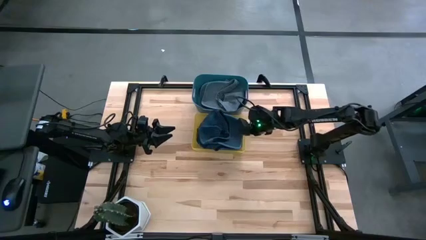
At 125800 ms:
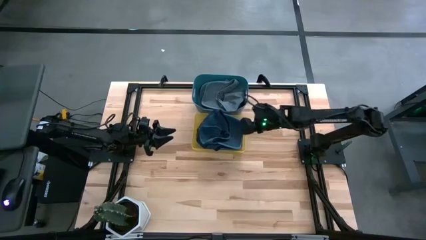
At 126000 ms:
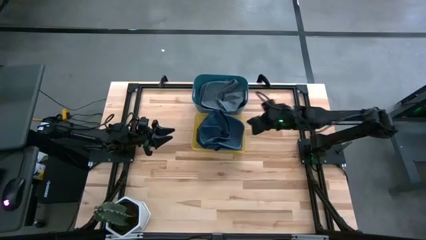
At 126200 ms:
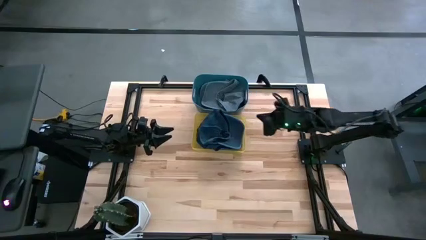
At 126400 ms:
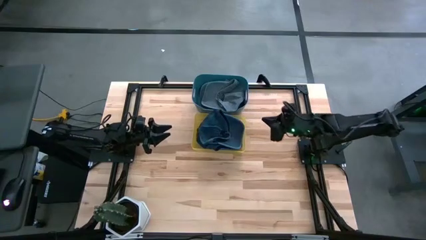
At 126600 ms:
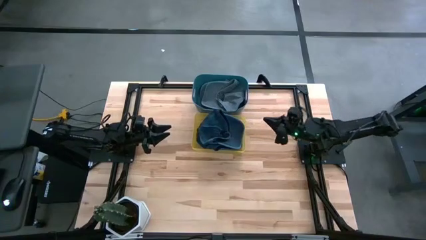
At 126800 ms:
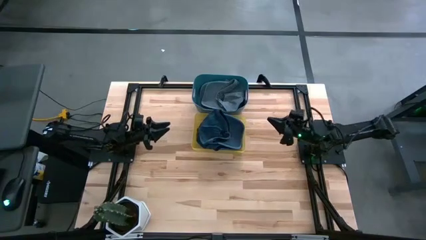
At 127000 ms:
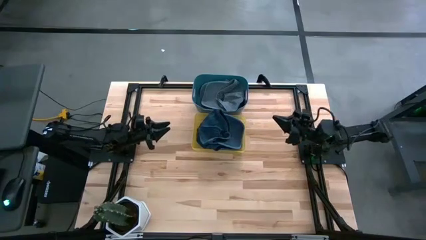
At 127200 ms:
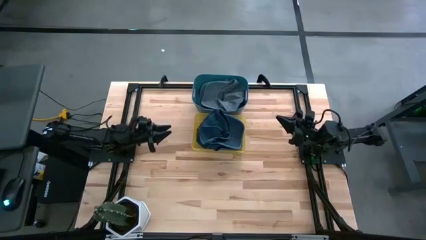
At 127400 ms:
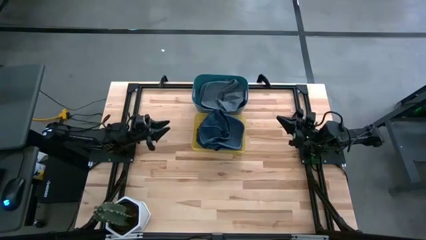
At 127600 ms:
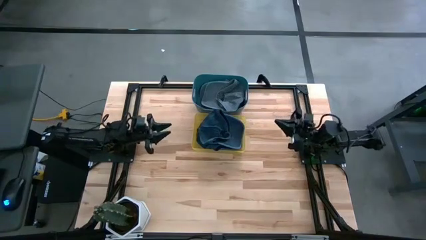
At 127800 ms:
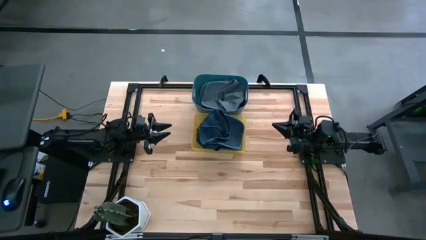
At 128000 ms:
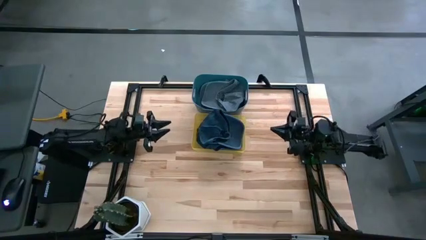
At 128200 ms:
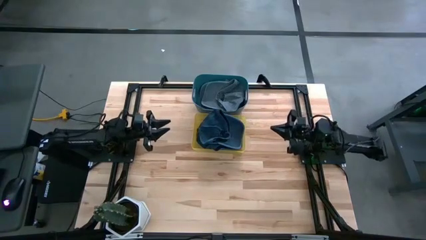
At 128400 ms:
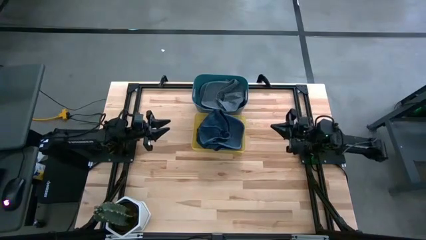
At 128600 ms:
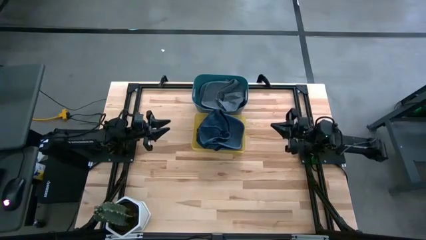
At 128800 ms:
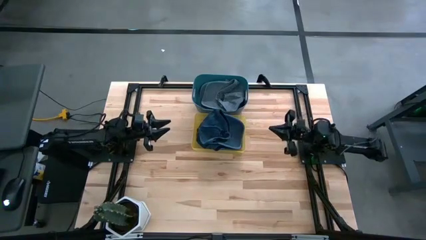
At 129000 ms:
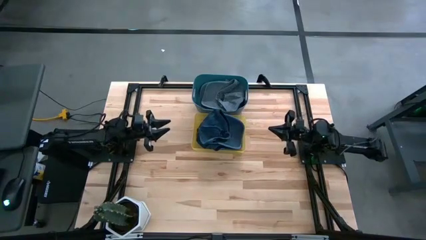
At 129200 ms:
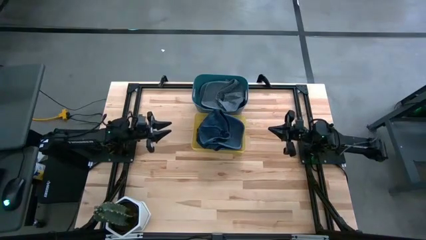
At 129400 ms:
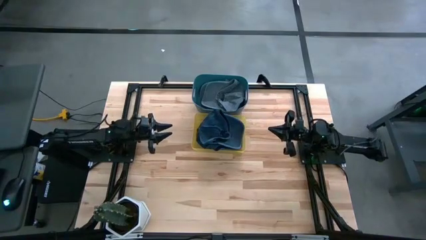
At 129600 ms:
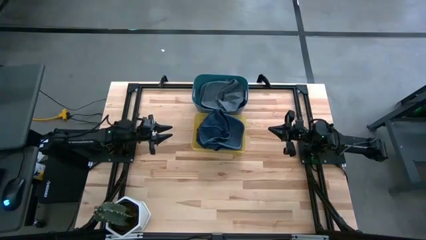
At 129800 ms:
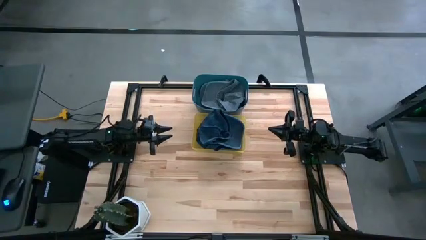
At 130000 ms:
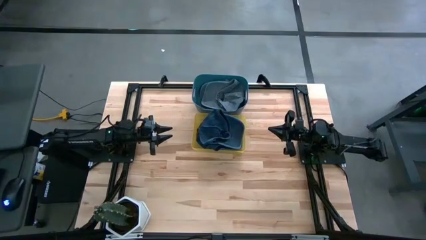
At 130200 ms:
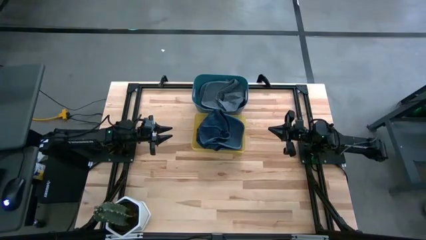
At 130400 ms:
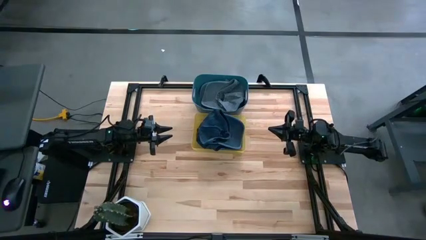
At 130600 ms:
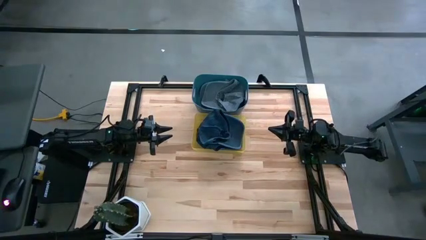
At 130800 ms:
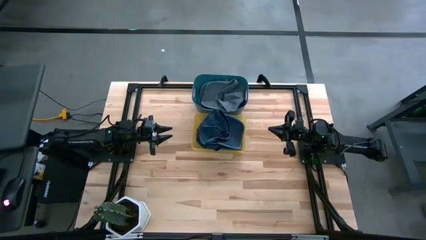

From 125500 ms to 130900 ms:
Task: Pick & Place hat
Return to Home Position

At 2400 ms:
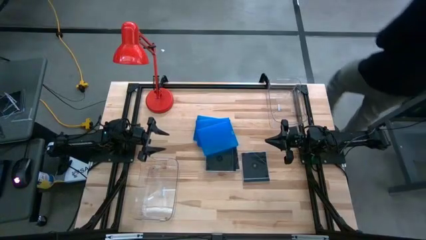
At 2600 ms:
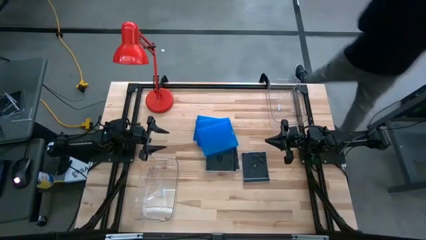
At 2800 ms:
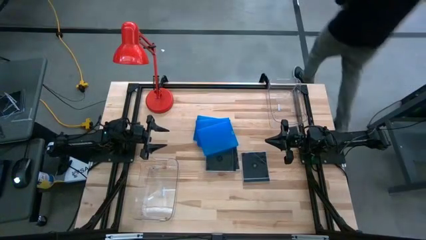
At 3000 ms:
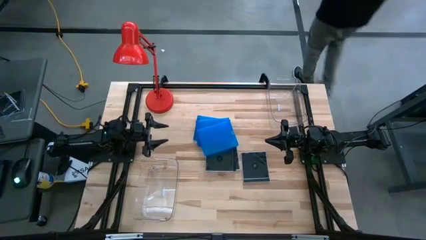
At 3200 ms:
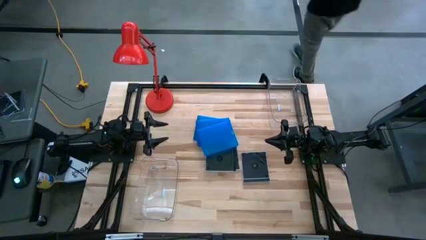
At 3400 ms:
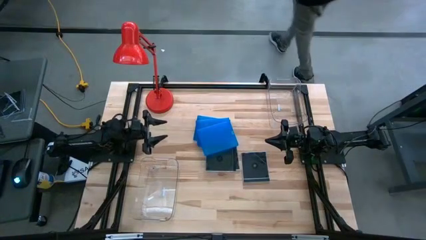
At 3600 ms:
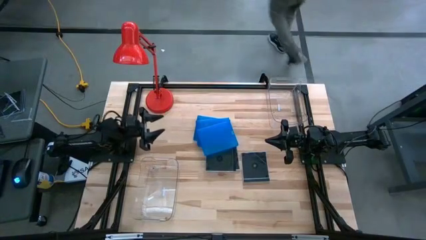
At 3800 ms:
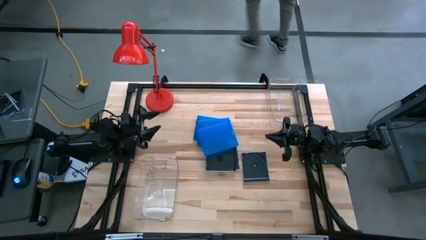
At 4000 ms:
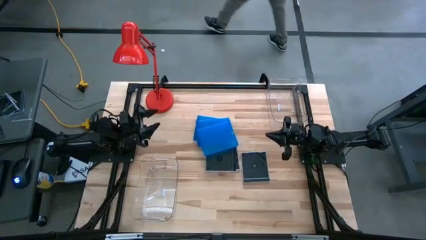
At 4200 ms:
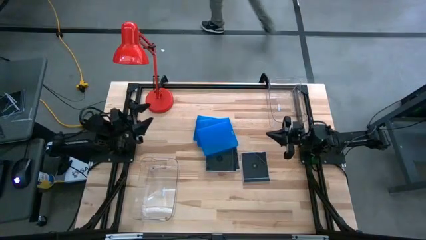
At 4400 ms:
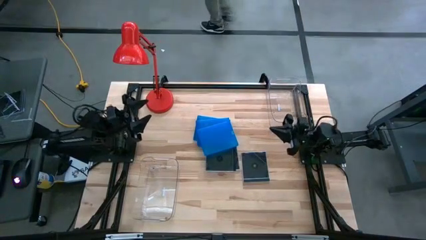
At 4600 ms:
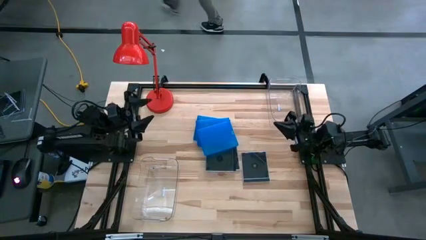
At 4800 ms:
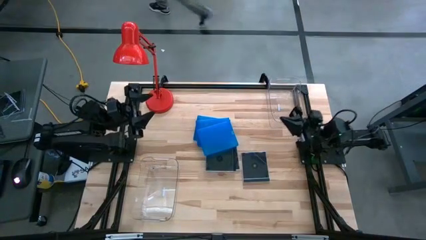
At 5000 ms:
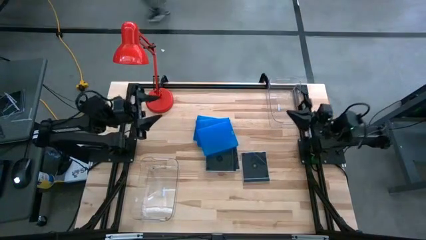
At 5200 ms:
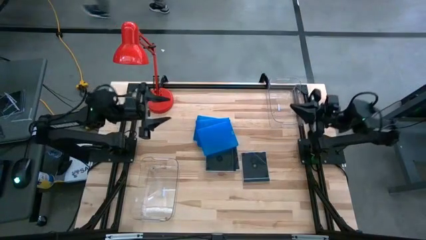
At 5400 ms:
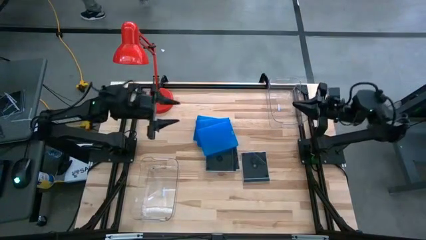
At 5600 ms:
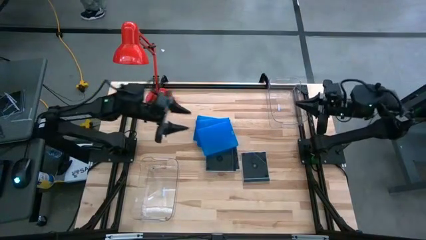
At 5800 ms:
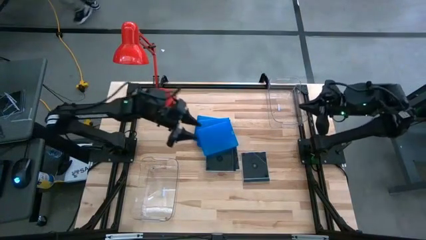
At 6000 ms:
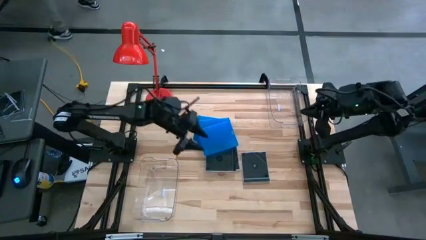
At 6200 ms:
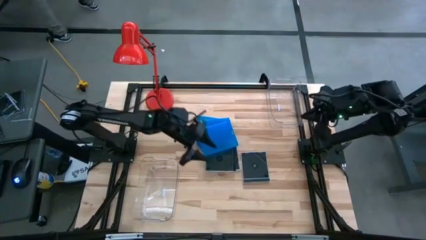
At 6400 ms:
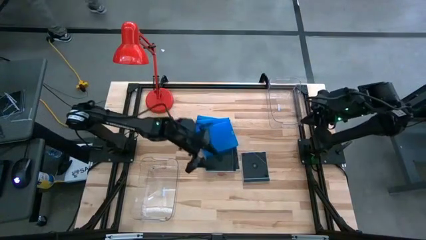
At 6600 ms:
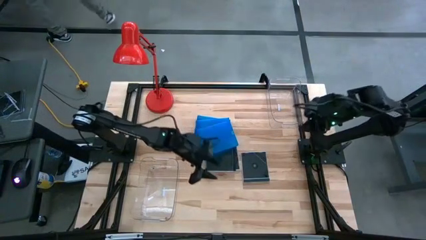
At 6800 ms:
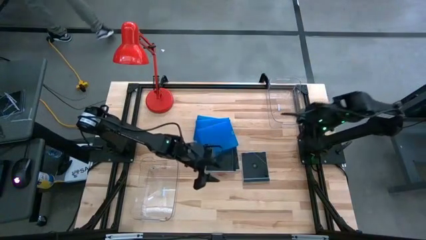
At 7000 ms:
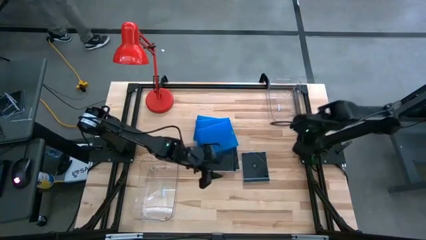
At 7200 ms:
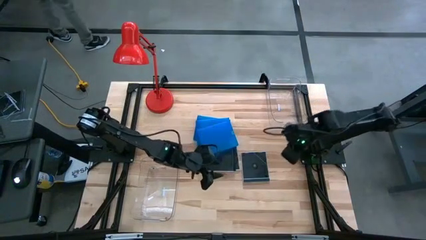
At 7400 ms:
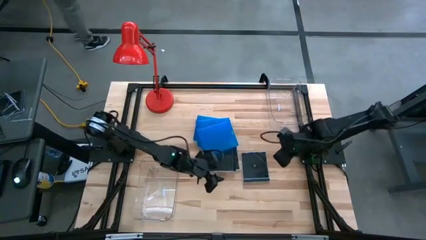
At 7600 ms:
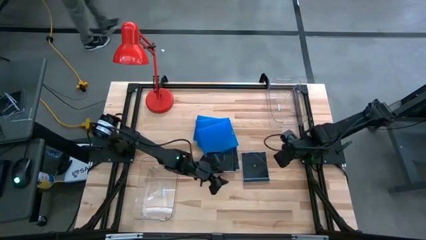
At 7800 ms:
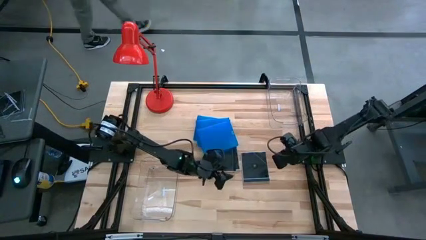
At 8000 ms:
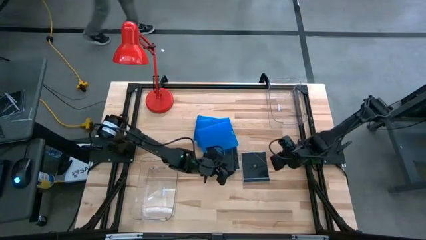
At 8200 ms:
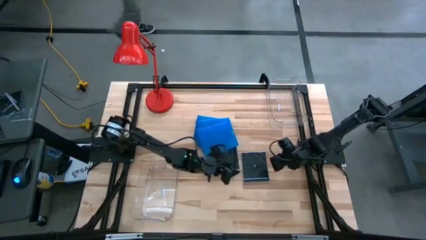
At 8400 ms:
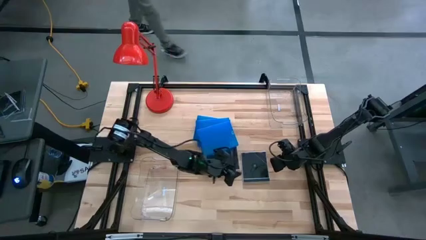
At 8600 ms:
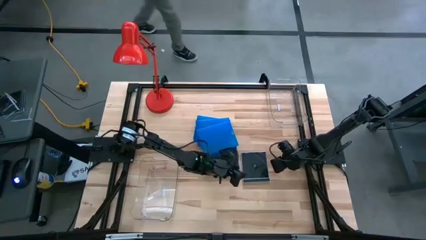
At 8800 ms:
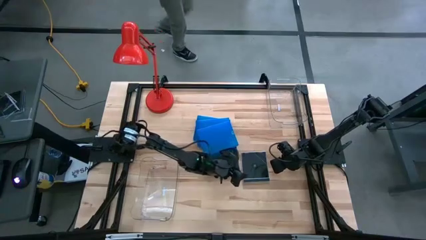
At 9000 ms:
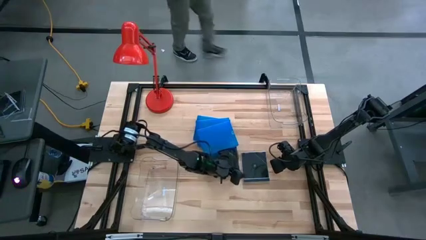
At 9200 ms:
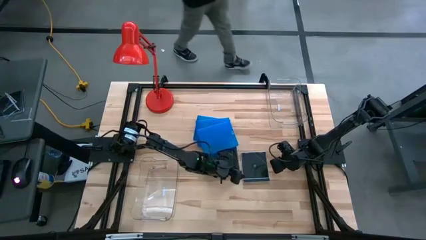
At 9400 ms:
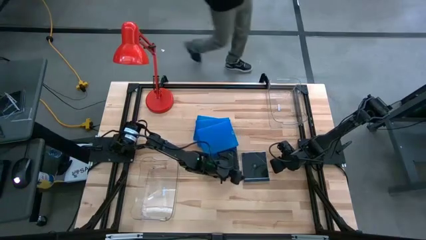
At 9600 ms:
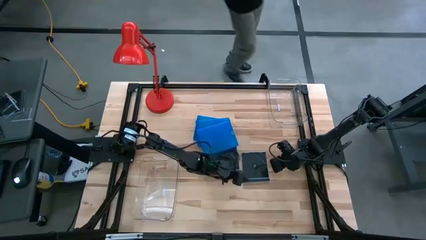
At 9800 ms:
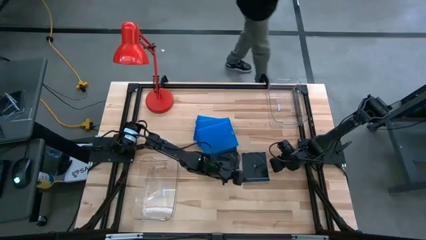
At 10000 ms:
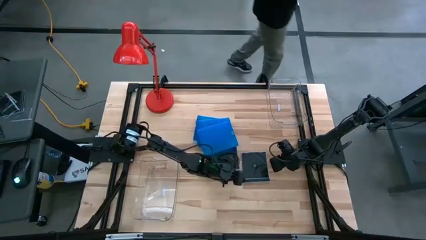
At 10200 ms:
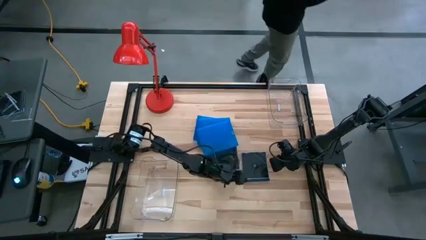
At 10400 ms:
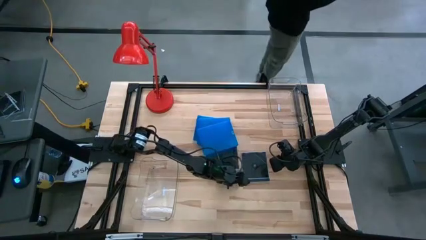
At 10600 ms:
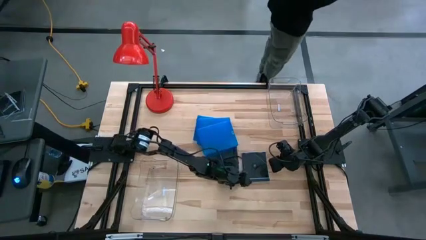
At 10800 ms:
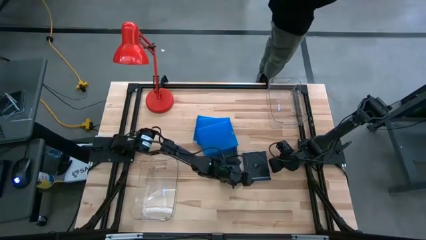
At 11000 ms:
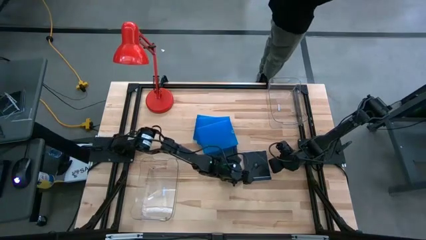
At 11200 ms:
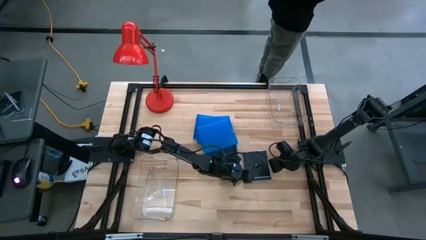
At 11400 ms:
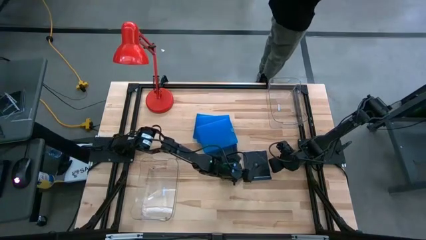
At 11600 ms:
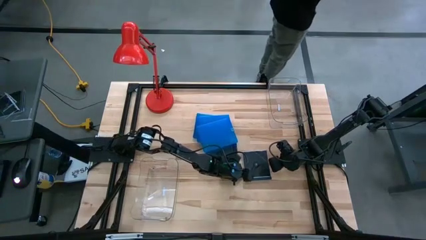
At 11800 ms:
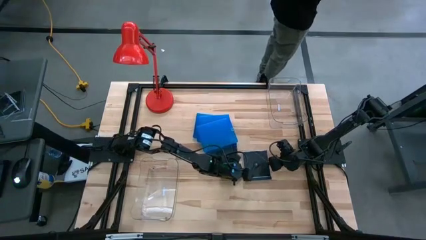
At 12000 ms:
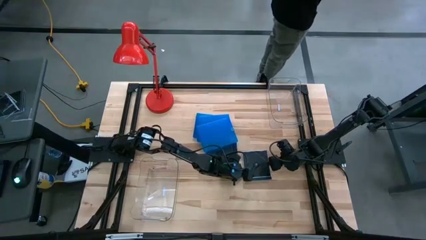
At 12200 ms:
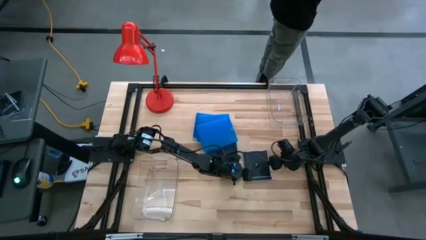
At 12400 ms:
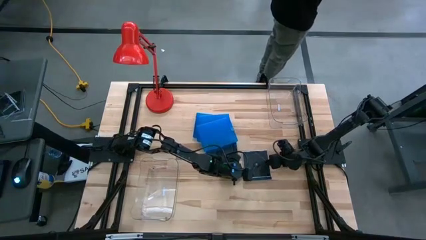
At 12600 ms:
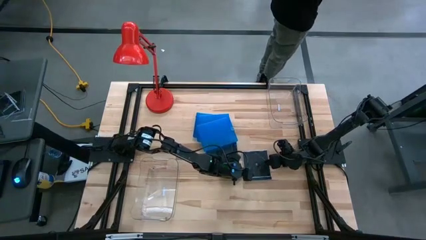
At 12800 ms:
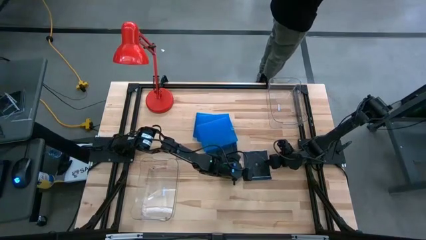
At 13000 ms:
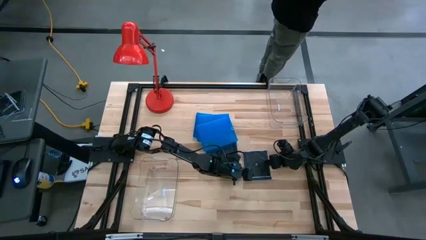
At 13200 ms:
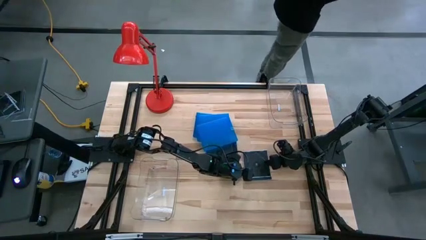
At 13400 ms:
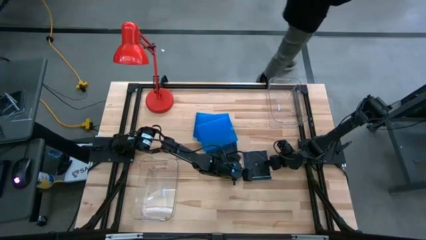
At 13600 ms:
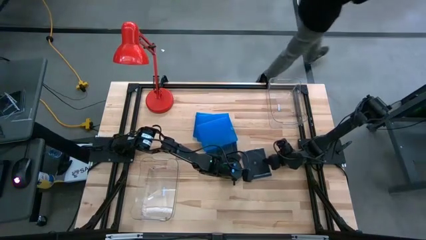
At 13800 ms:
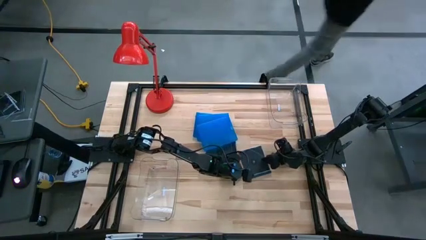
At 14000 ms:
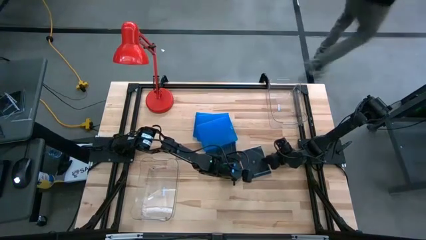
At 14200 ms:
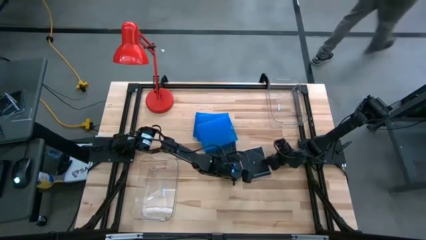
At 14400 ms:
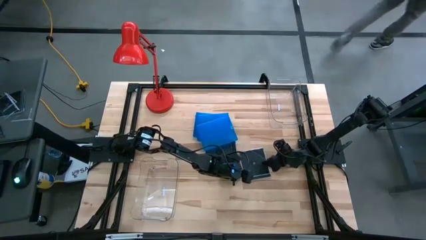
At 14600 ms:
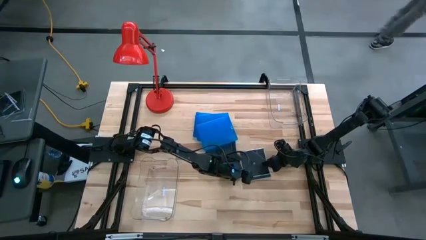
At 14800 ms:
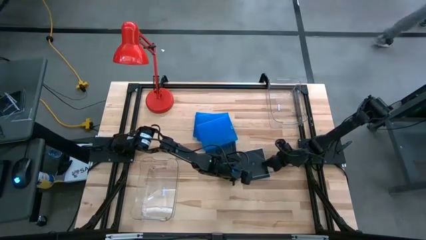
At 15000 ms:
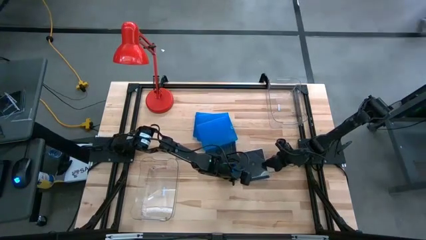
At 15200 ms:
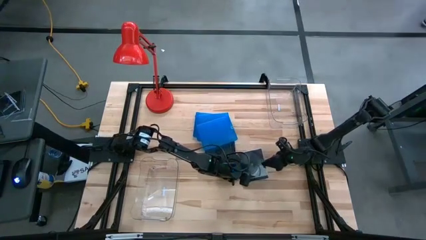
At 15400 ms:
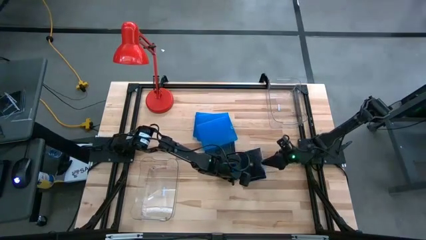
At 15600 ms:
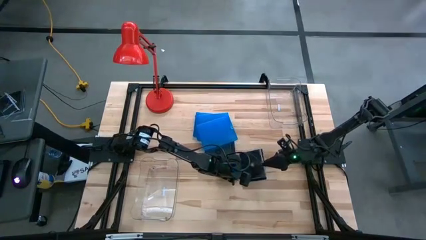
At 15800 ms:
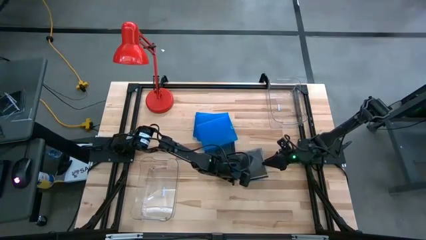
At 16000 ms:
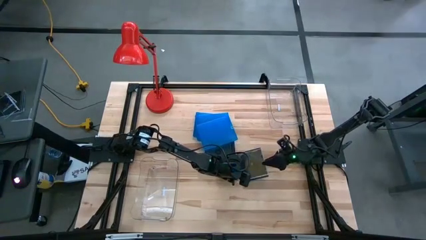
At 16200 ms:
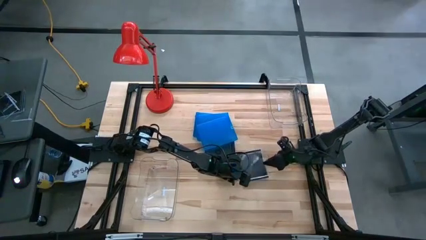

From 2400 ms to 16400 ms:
Task: Pick & place jewel cases by type
Put the black cd case into the bottom transparent bin
